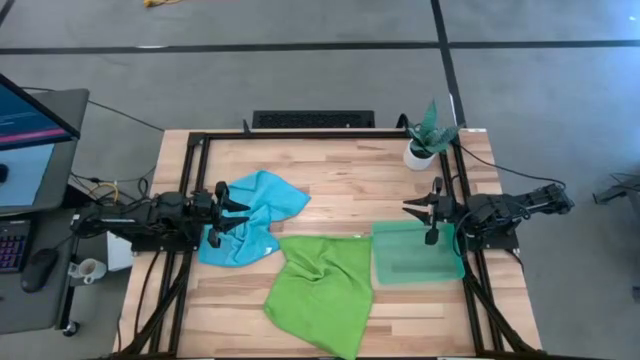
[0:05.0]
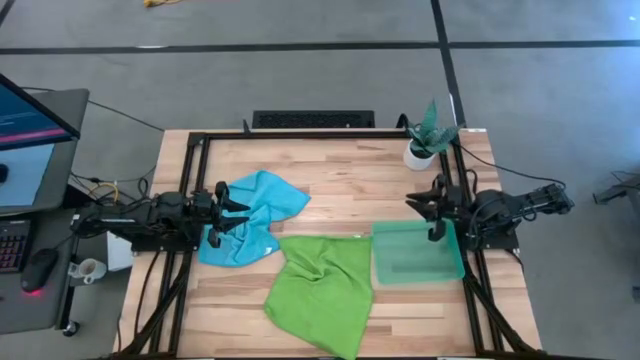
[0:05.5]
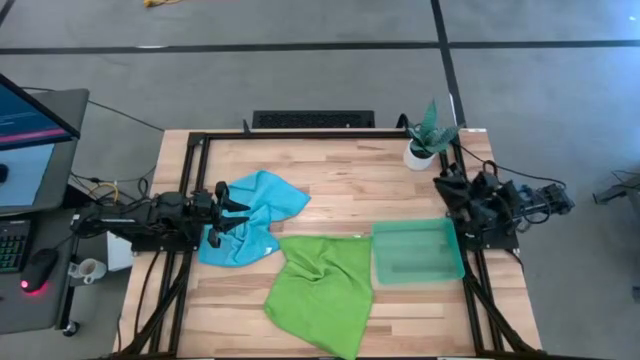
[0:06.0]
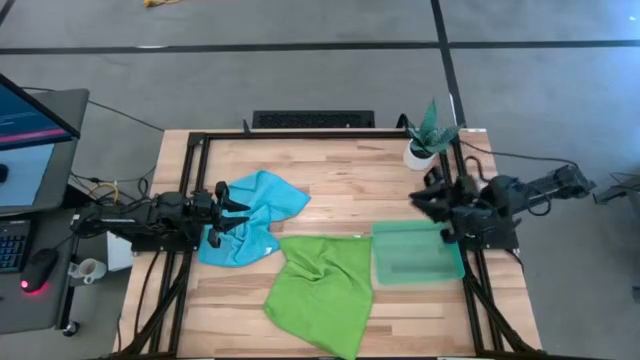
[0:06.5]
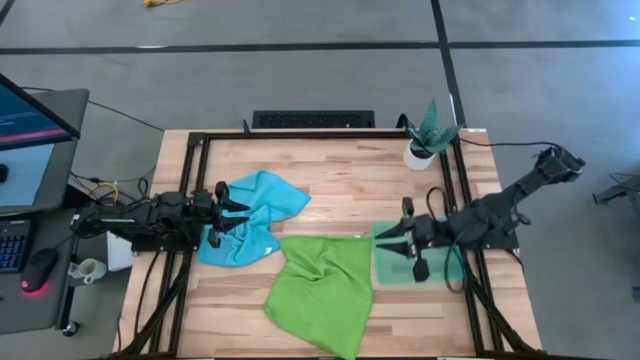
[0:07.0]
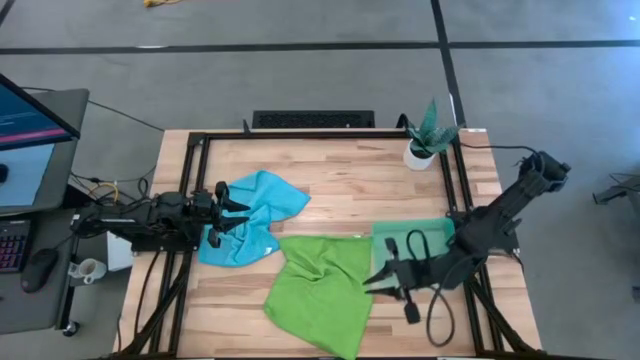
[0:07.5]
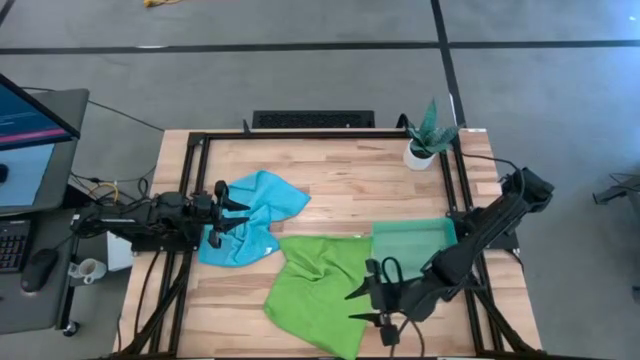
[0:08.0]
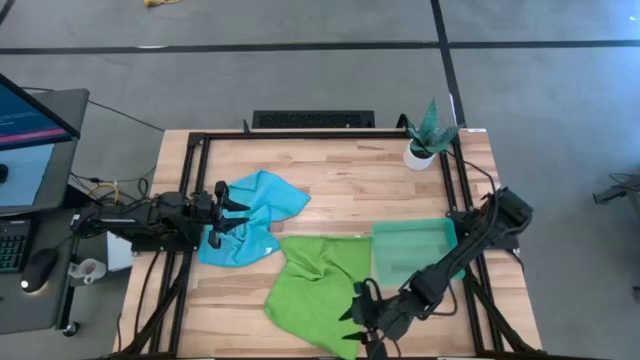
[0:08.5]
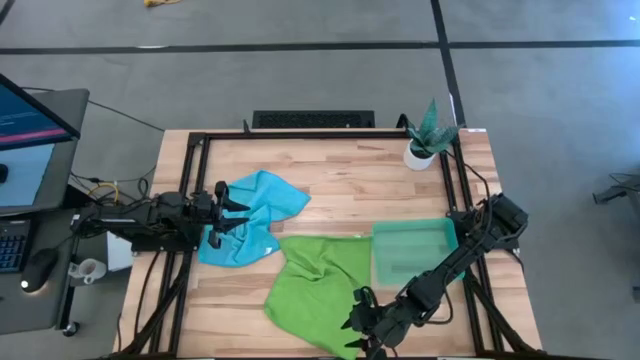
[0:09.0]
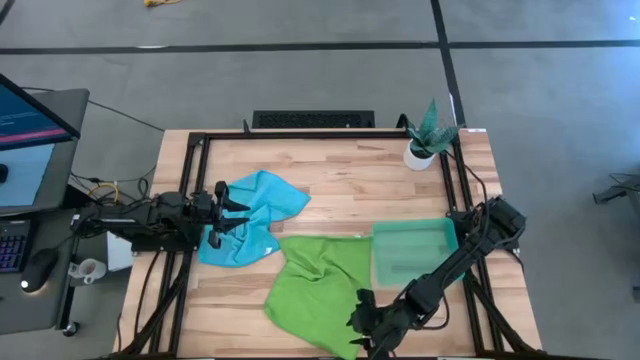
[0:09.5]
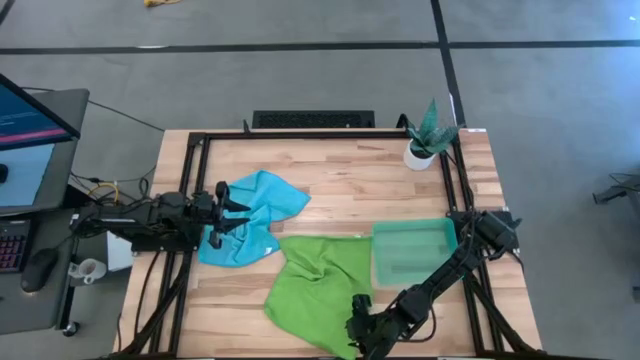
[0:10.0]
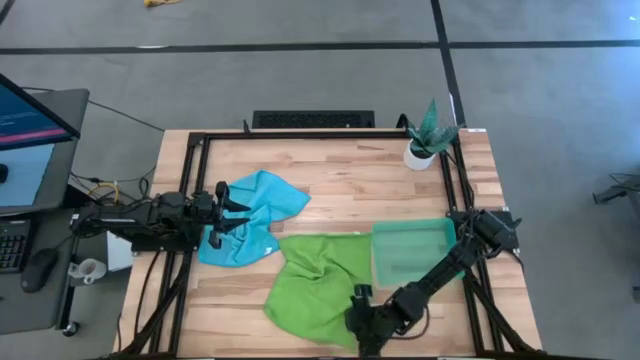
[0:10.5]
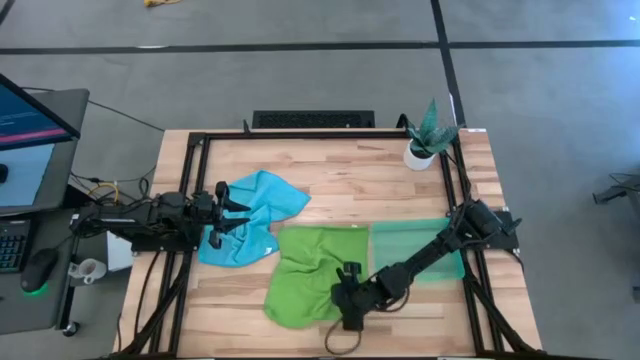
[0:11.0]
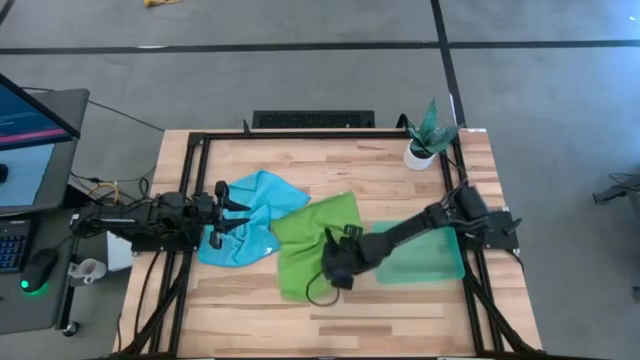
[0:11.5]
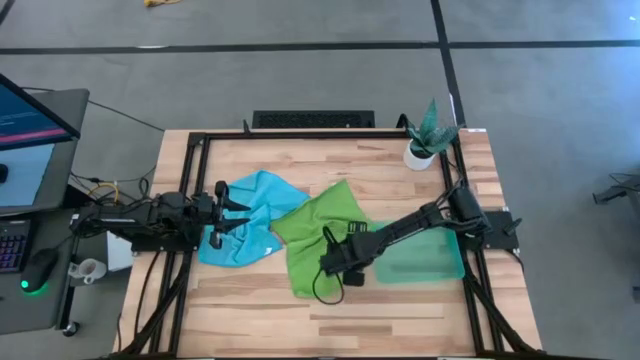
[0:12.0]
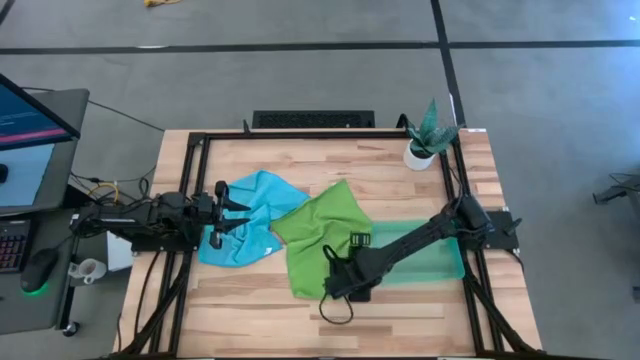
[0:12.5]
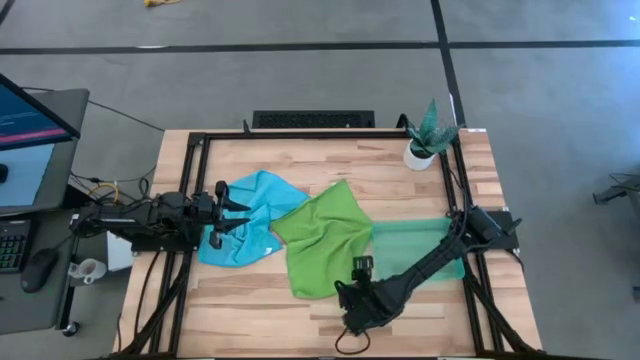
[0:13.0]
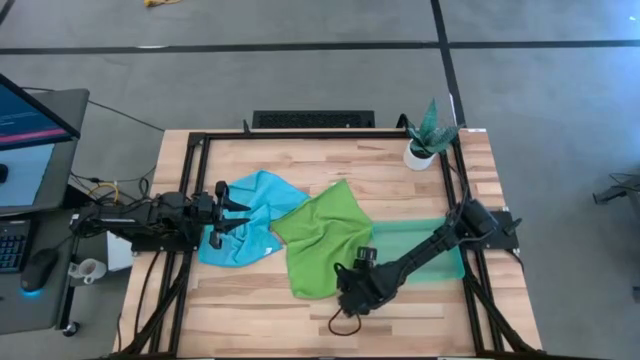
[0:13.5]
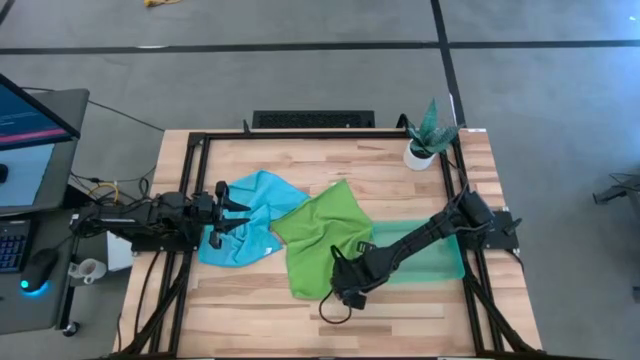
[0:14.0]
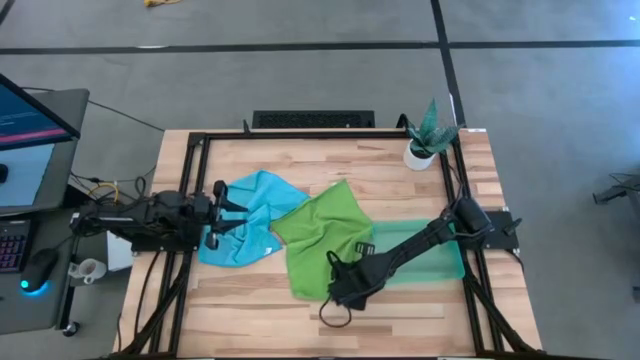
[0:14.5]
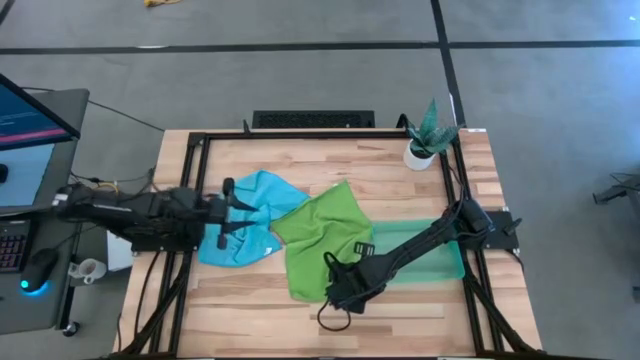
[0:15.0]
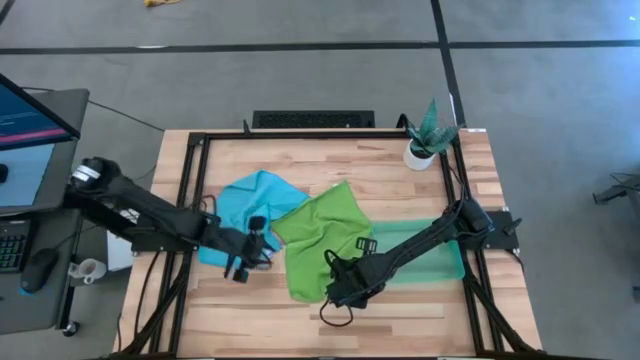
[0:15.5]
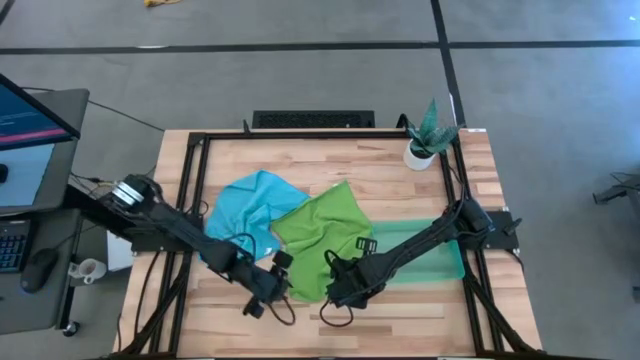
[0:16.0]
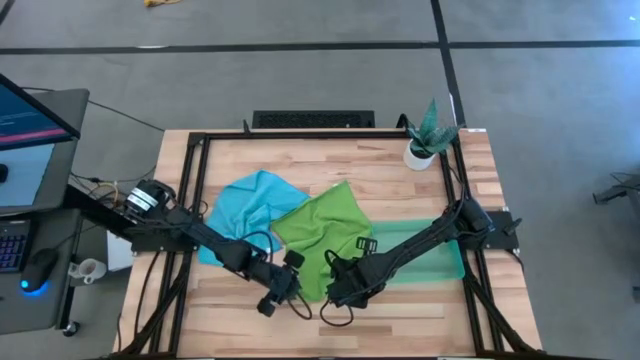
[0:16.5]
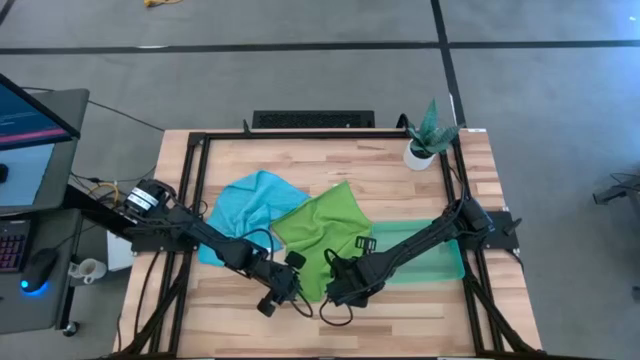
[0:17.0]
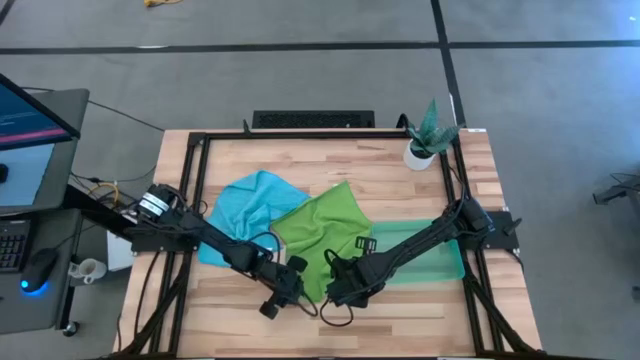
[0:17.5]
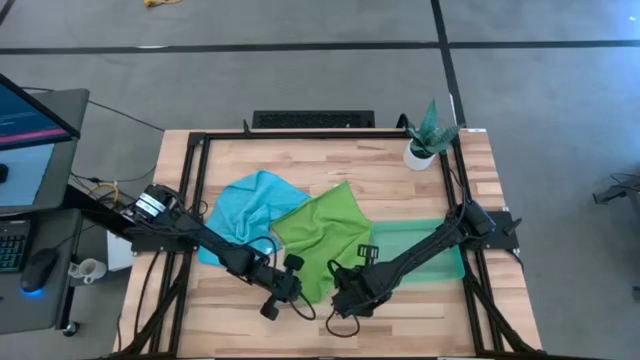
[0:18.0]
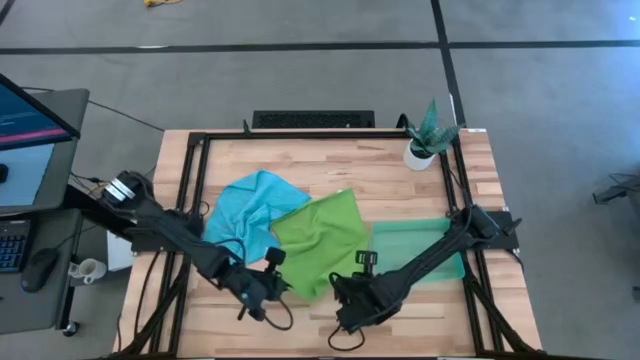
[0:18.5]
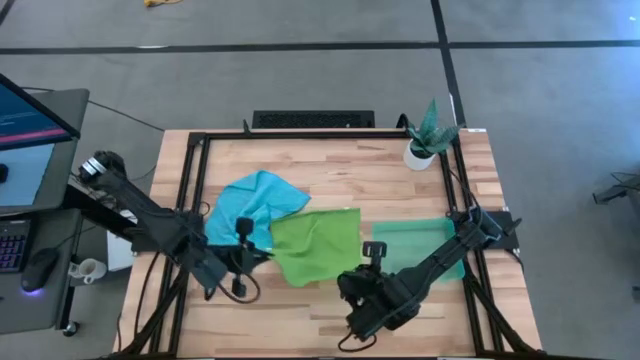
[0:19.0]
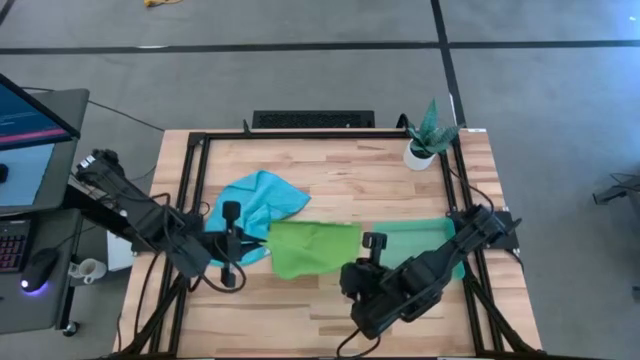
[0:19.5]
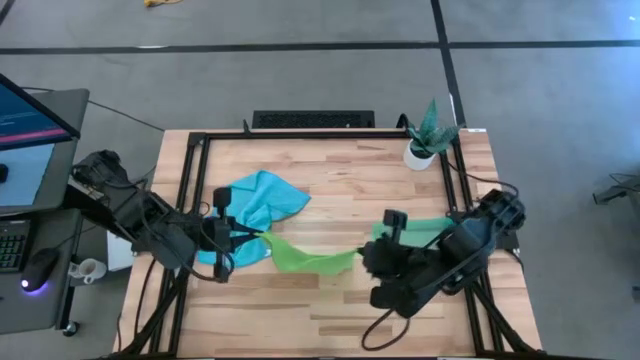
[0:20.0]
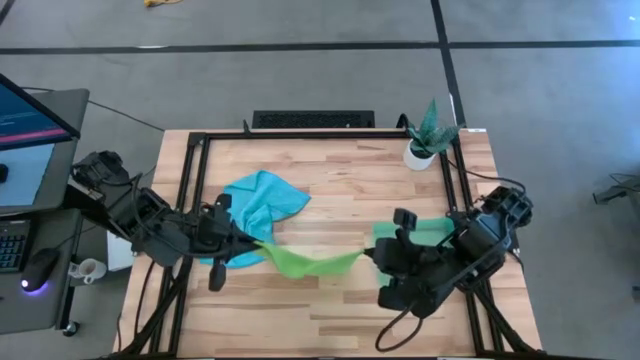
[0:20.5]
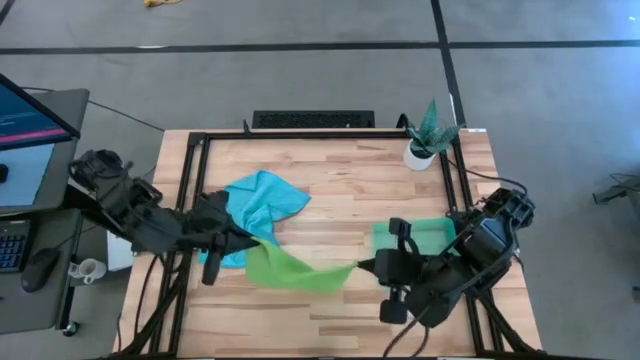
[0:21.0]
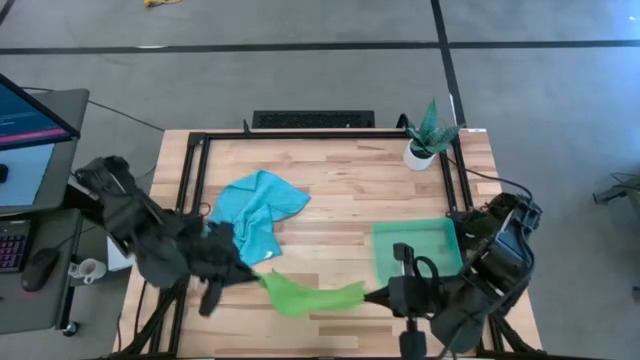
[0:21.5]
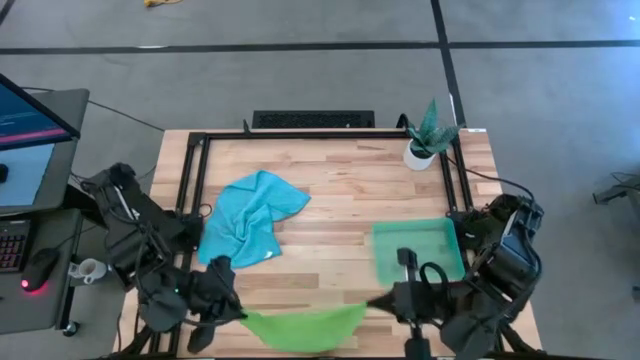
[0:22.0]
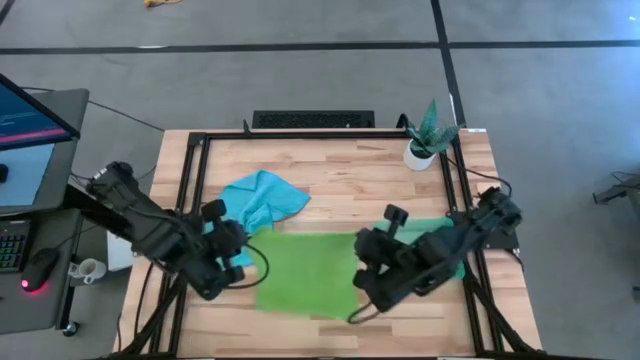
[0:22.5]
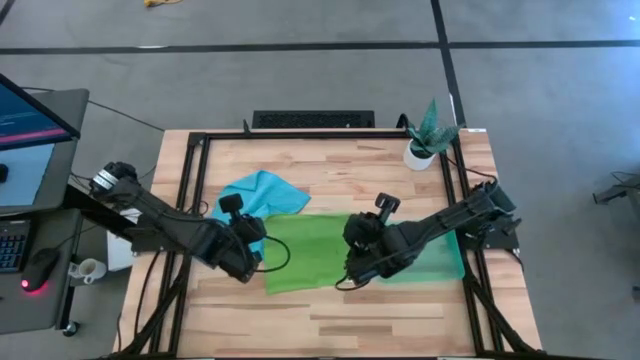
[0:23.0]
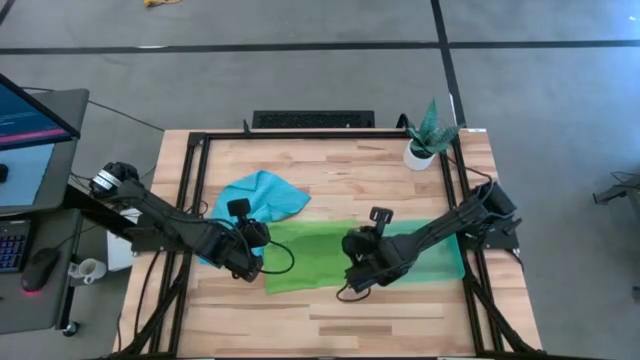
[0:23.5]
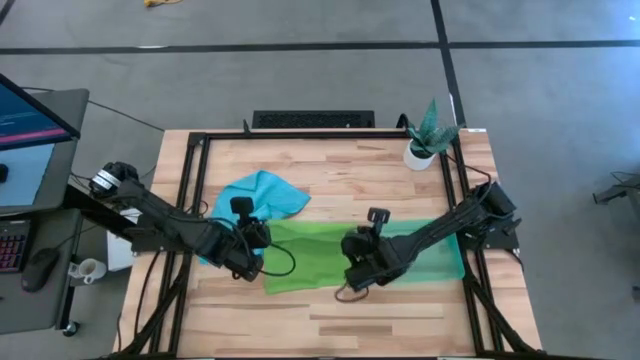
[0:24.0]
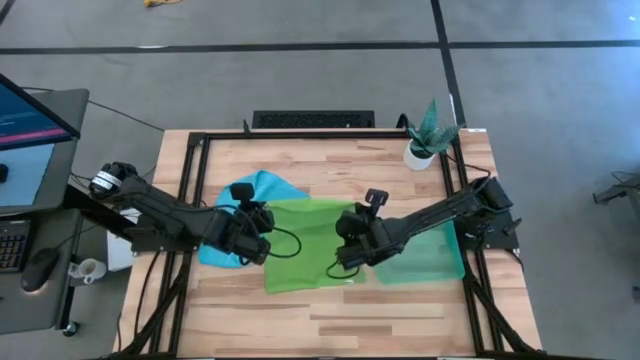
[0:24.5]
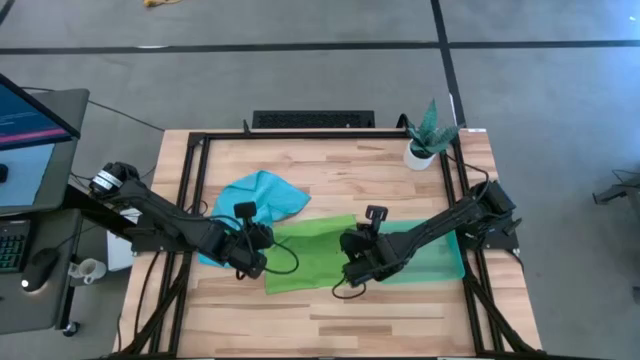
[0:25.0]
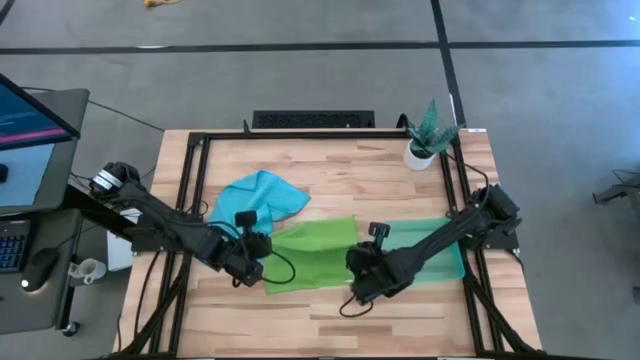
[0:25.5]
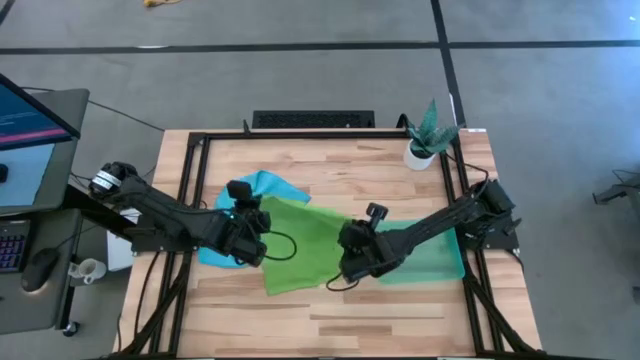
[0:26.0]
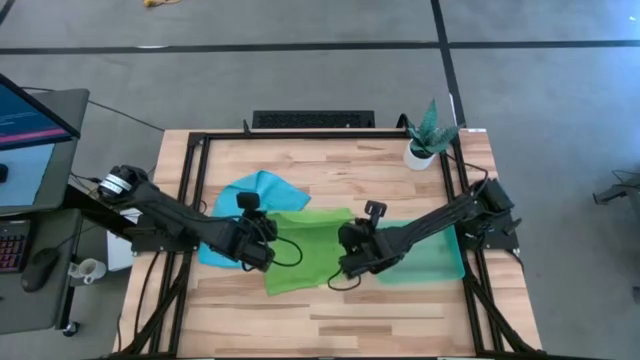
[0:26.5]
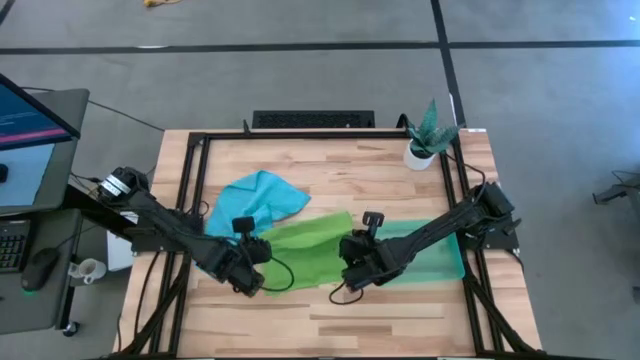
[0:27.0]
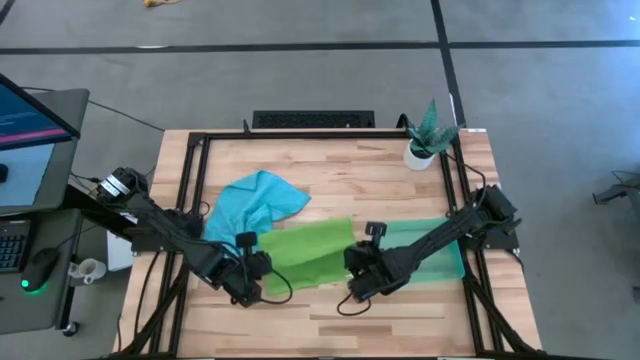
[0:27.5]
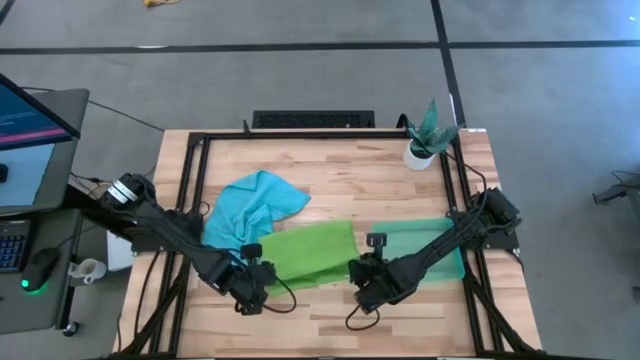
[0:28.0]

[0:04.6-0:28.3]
Task: Roll microfiber towels into tight, uniform cylinder then place into a basket
Fold the green towel
